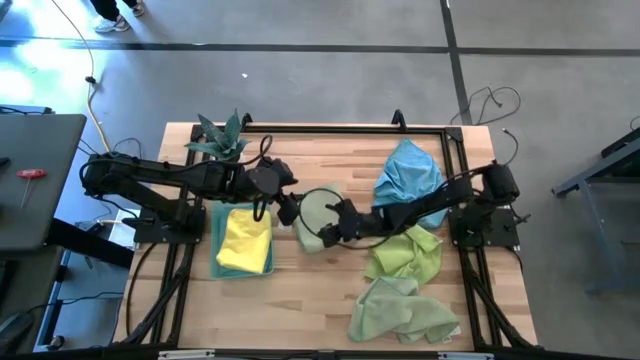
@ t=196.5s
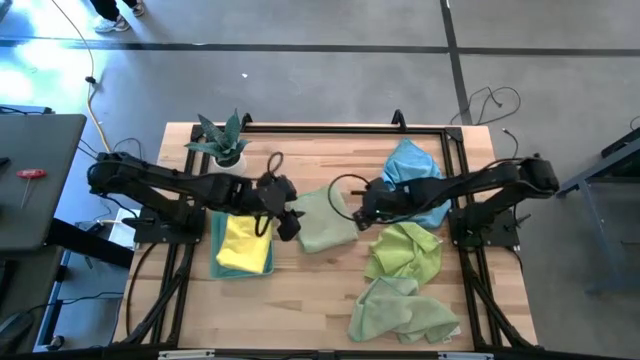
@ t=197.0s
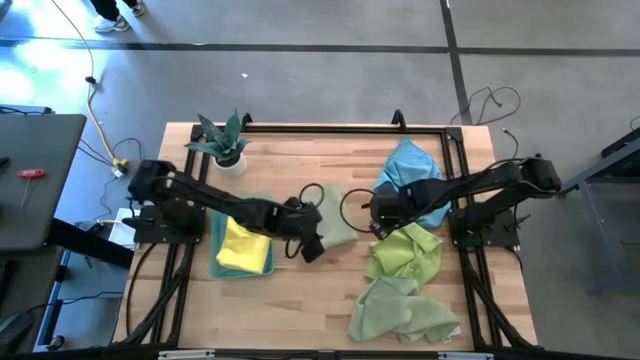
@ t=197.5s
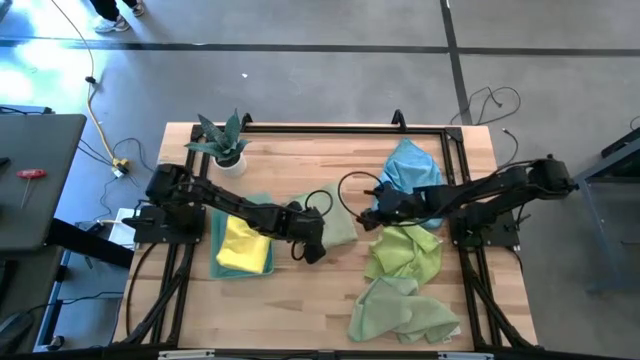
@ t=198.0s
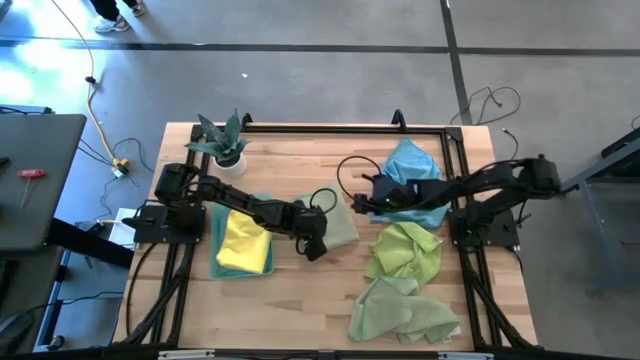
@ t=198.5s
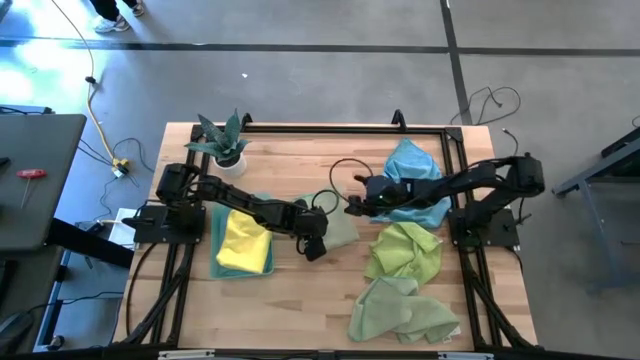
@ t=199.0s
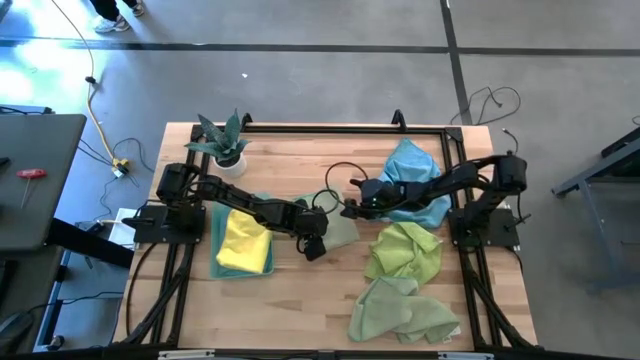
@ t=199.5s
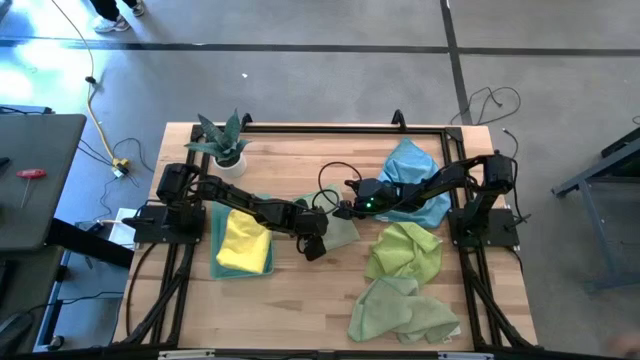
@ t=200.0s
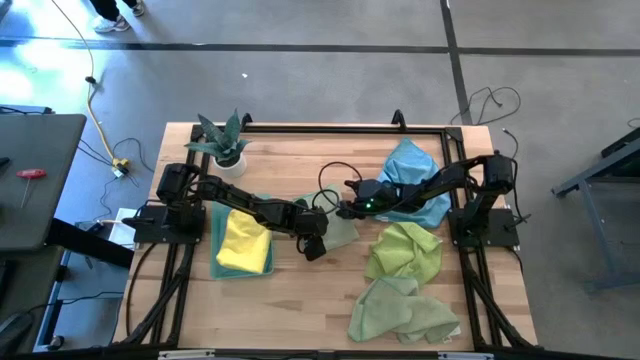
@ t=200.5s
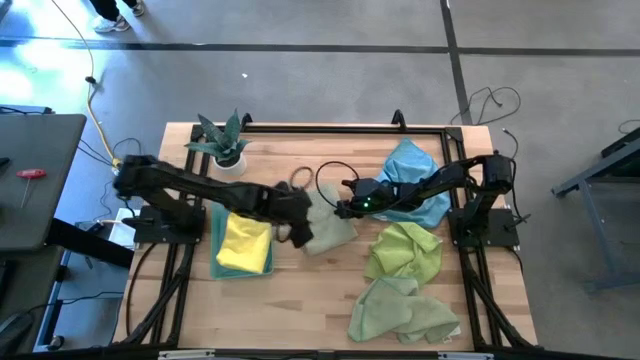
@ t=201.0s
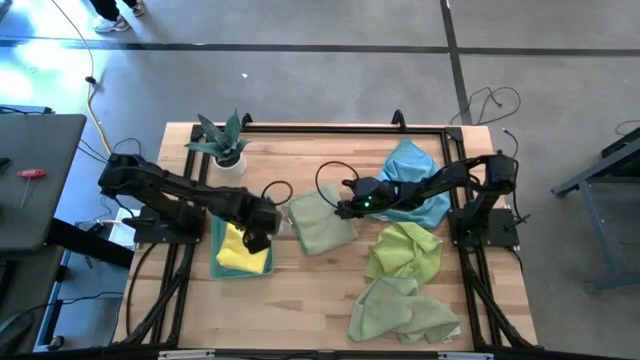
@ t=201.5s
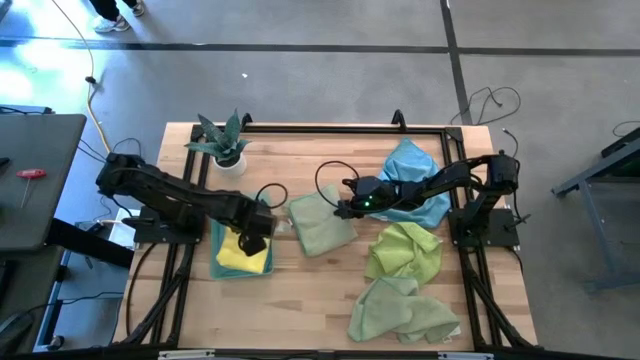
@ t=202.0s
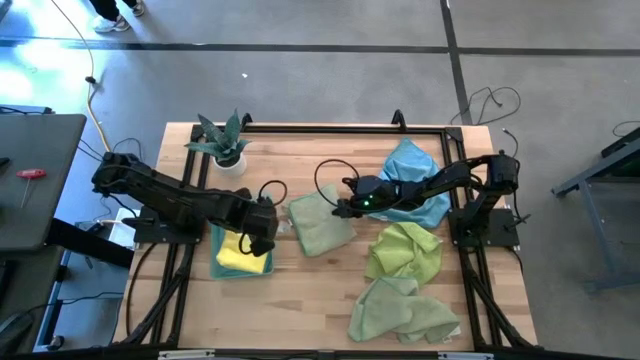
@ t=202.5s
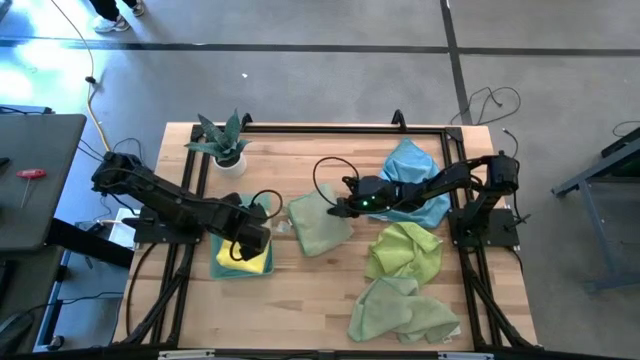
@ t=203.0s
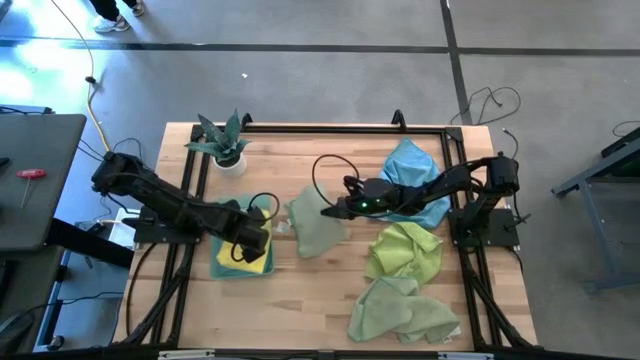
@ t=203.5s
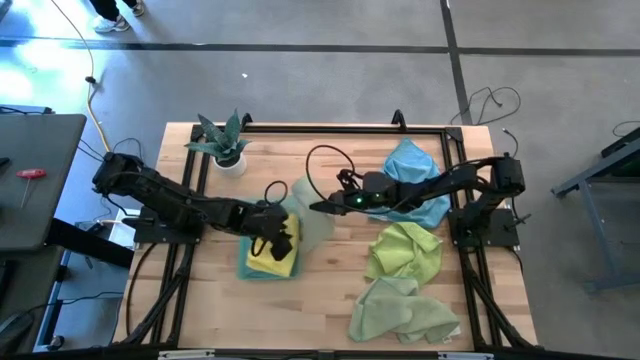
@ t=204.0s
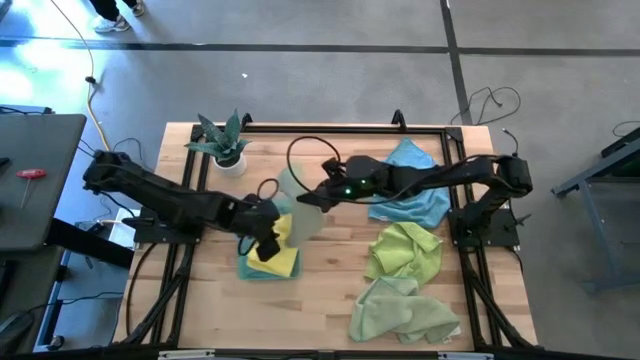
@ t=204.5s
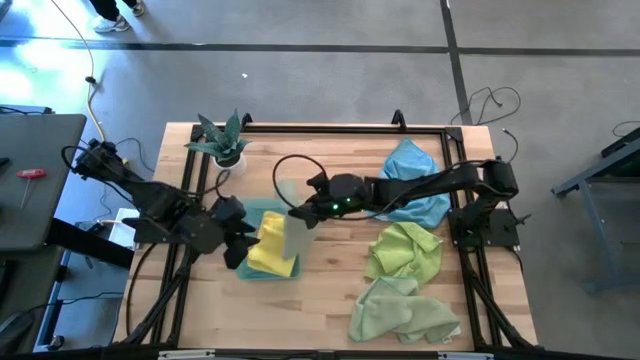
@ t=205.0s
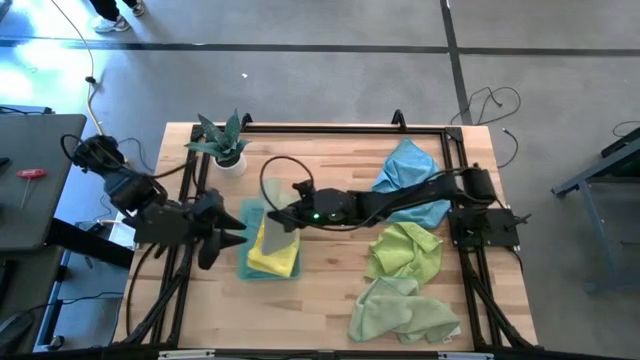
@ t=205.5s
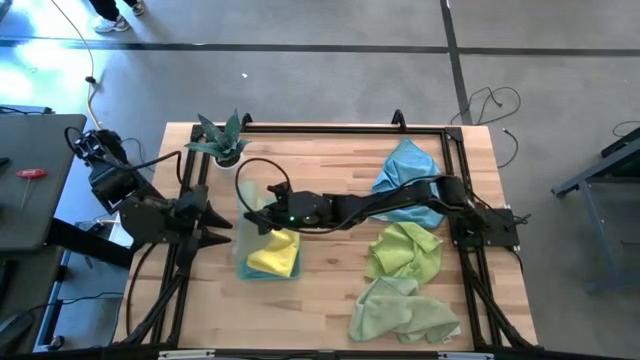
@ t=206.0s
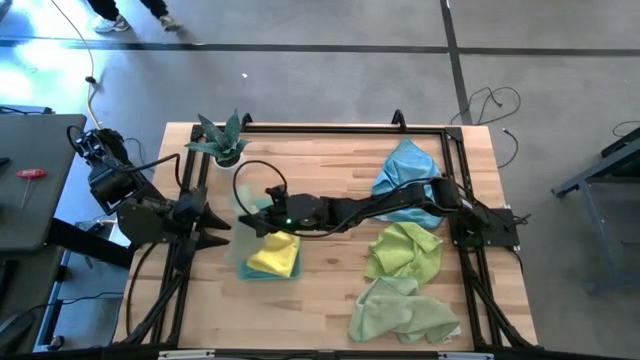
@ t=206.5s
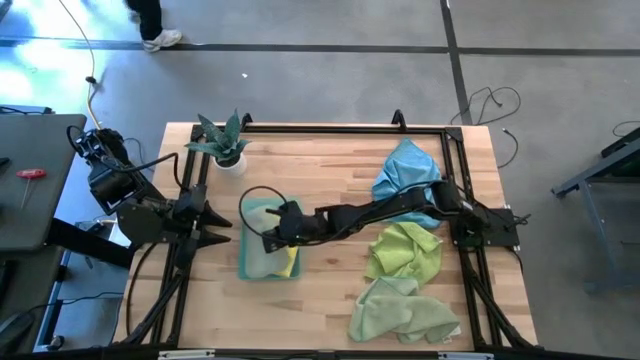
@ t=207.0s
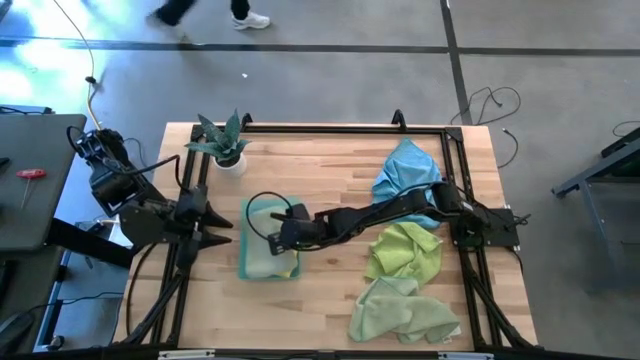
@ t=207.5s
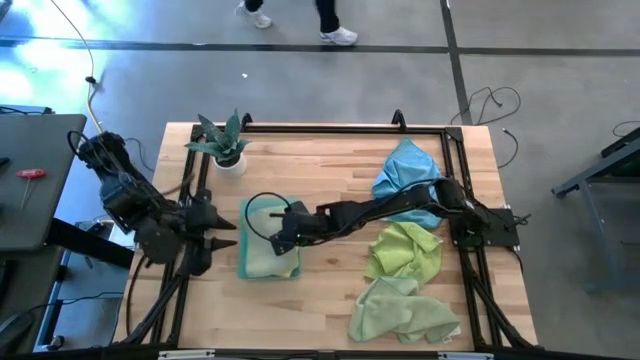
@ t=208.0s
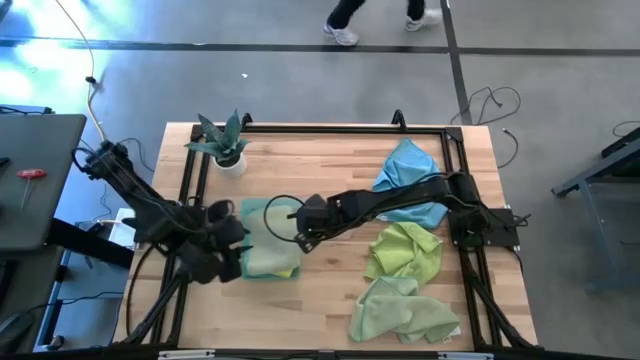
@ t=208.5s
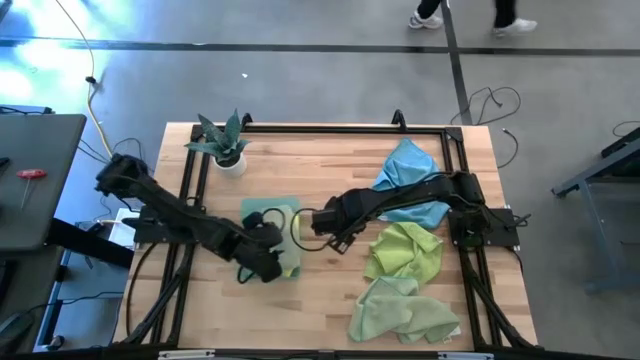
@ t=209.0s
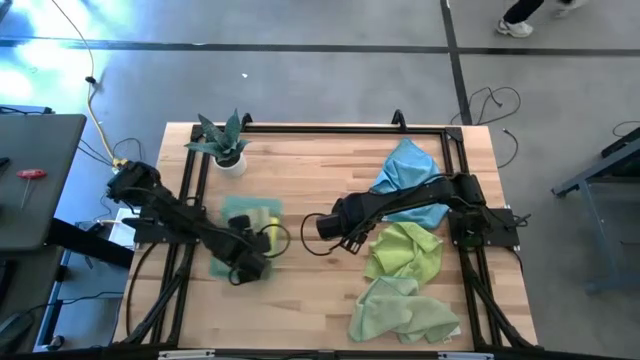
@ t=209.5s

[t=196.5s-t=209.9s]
Task: Fold microfiber towels
Put the top green microfiber towel into the green bin

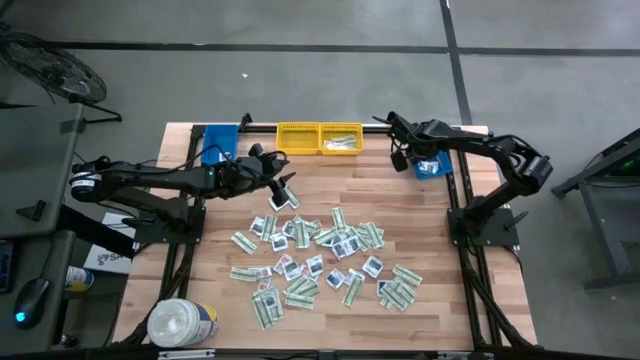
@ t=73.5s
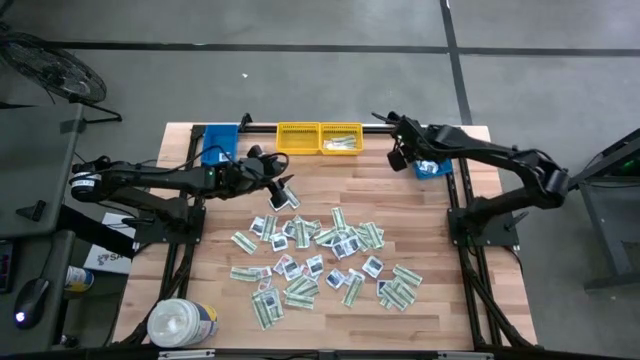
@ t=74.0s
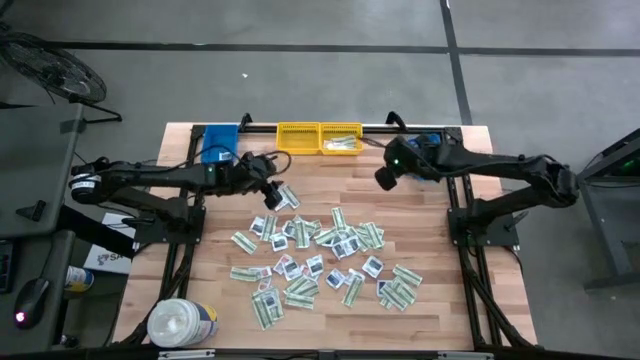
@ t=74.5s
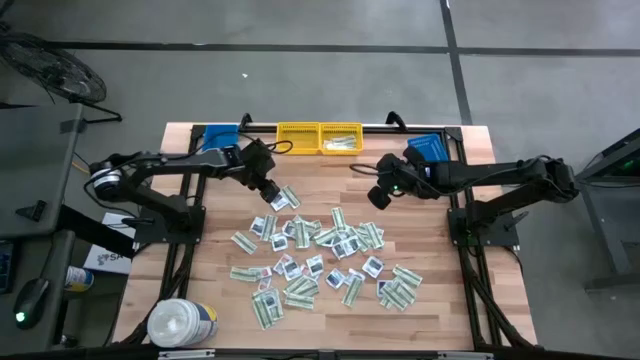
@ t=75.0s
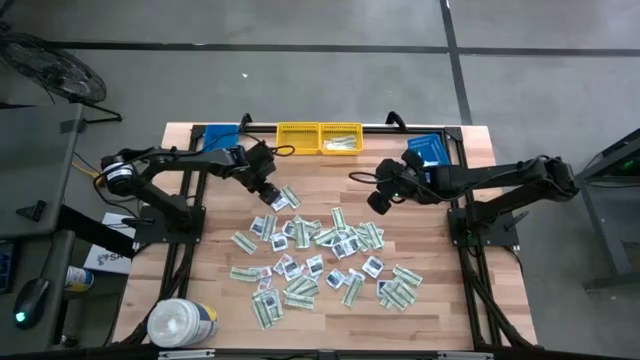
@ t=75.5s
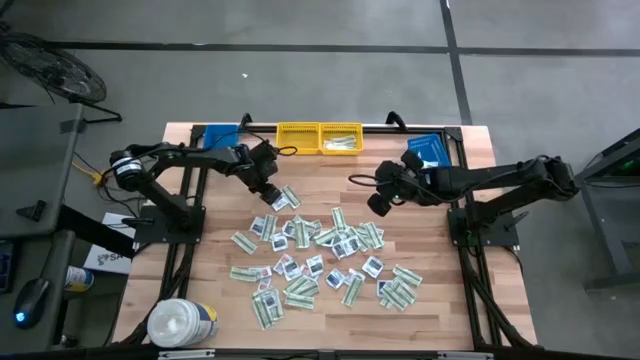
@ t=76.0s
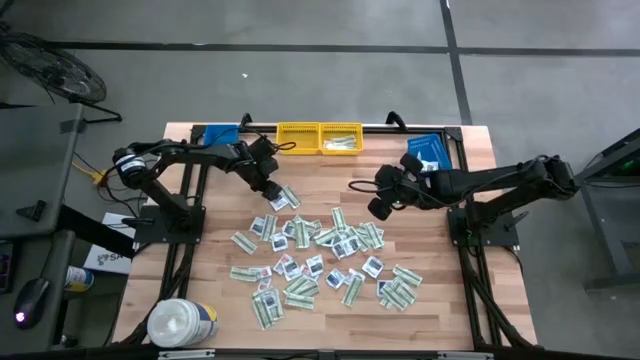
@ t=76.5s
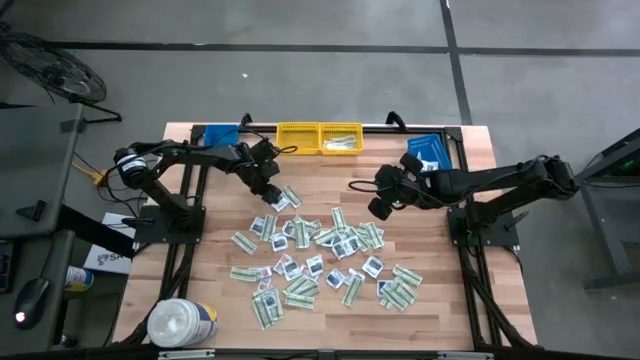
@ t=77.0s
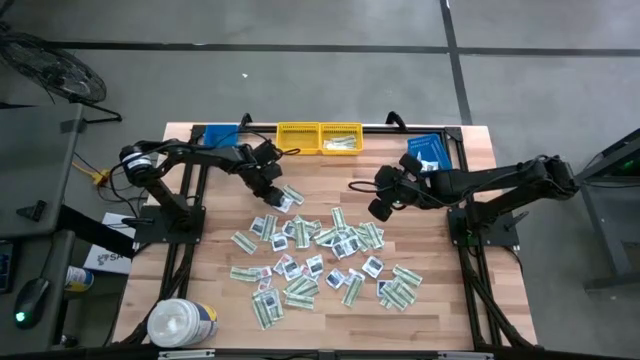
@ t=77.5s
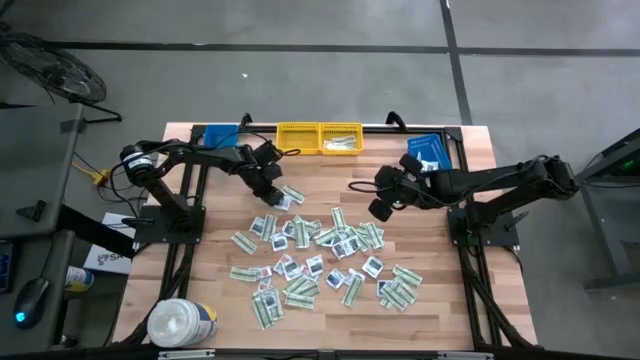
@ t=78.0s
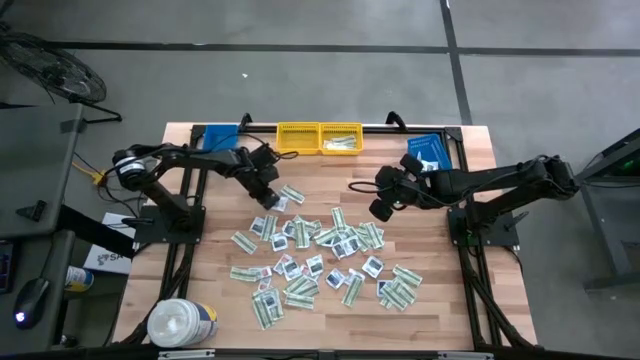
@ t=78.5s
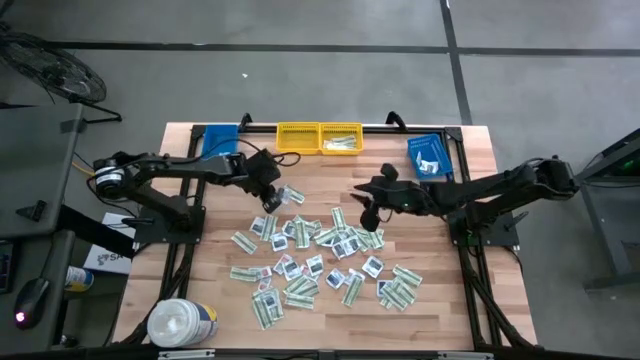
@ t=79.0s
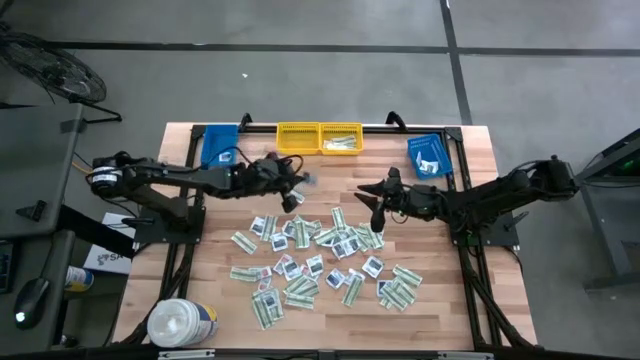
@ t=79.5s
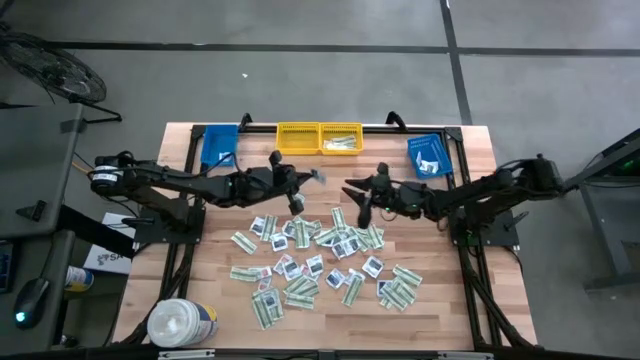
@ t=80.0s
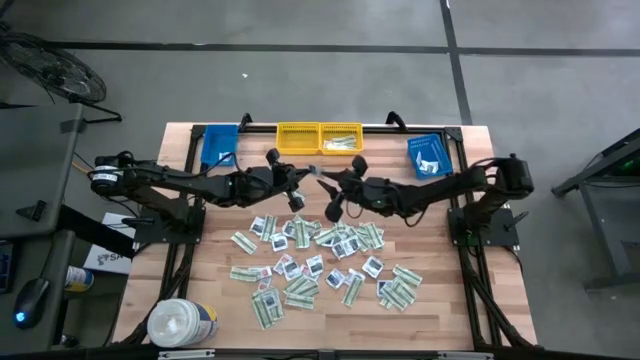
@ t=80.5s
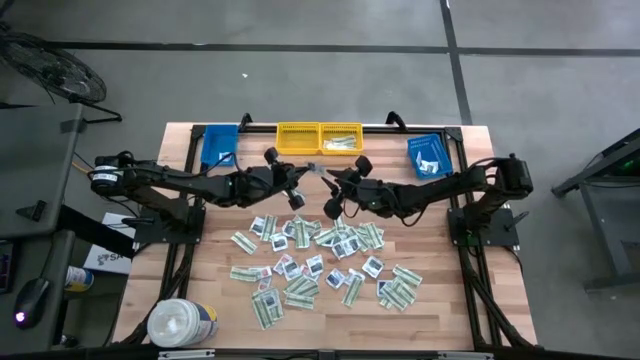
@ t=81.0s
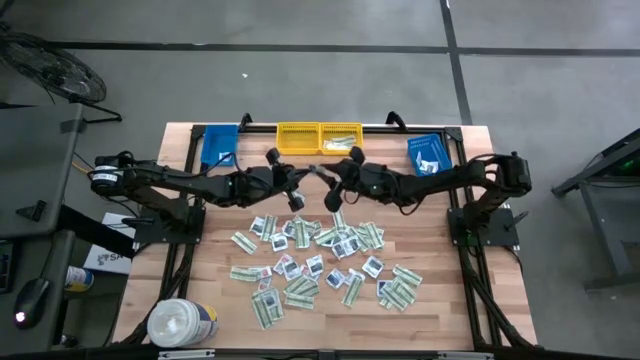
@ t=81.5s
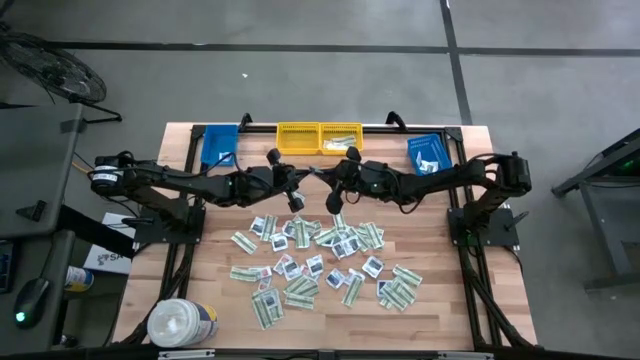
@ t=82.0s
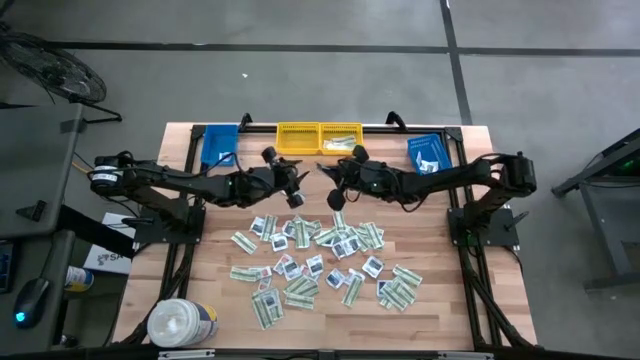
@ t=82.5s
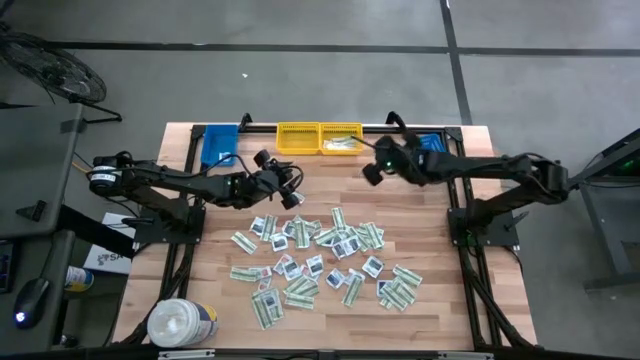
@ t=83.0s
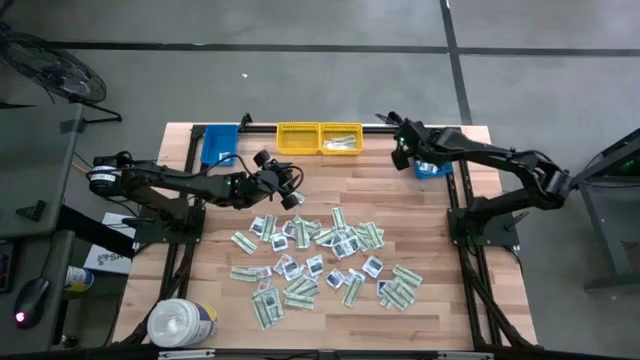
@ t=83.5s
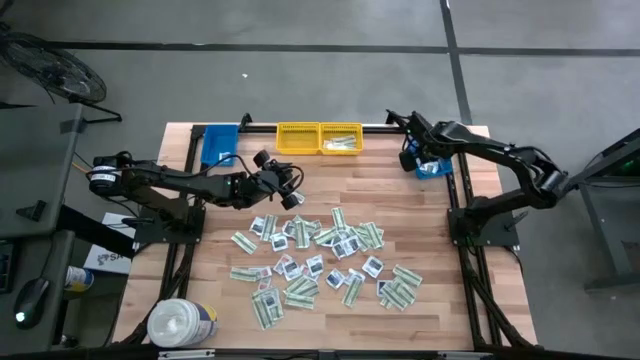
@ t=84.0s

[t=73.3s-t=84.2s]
Task: Pick & Place First Aid Supplies
Put the black towelette pack into the right blue bin
